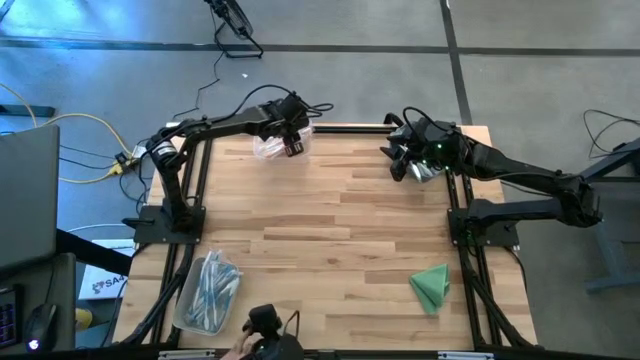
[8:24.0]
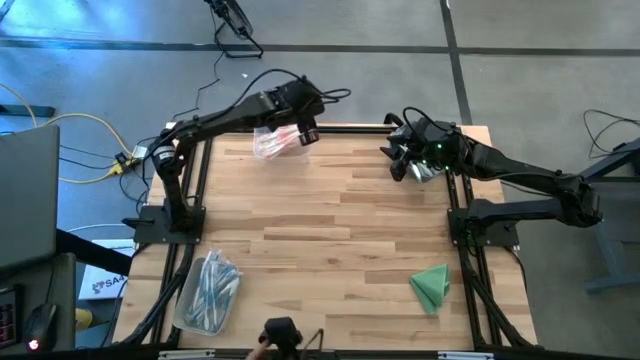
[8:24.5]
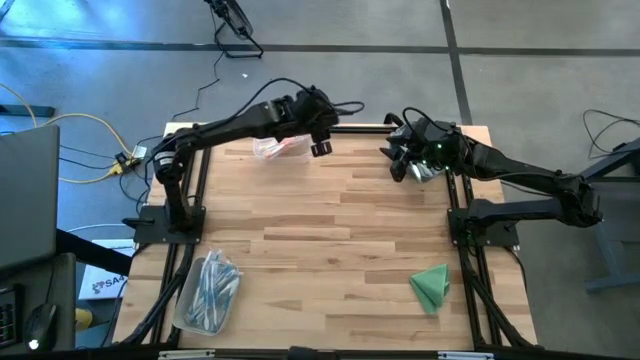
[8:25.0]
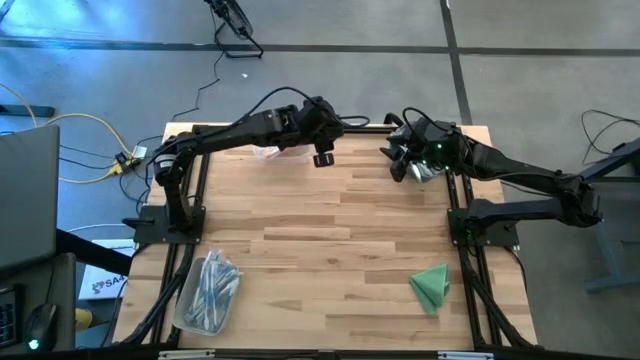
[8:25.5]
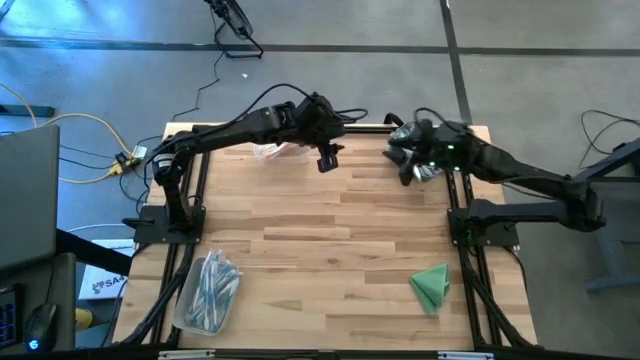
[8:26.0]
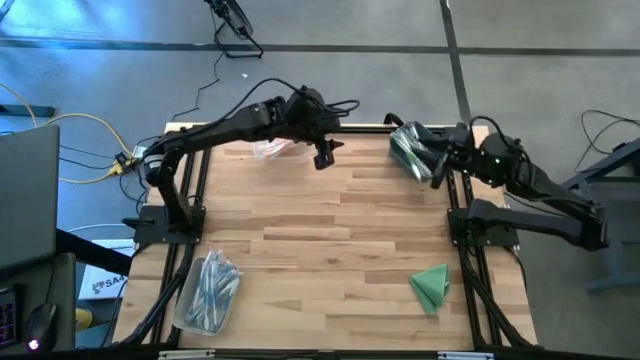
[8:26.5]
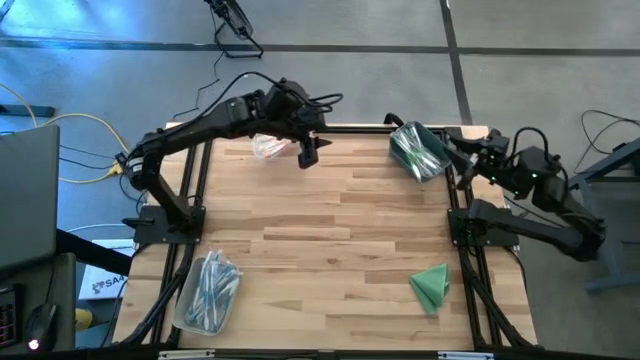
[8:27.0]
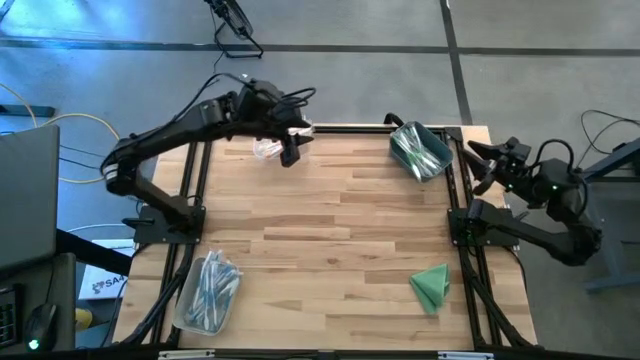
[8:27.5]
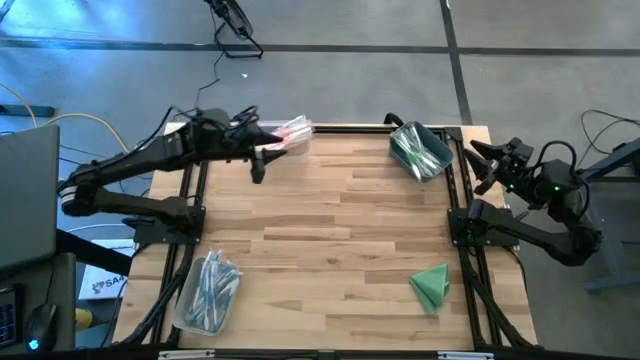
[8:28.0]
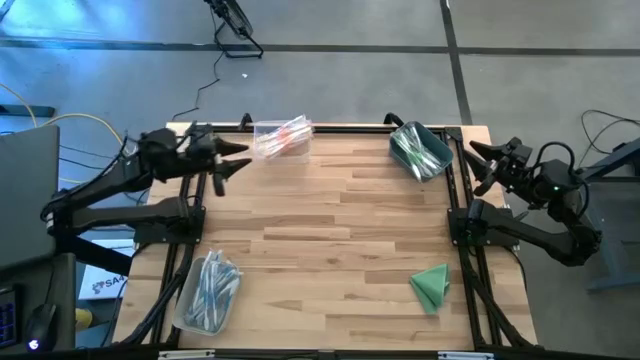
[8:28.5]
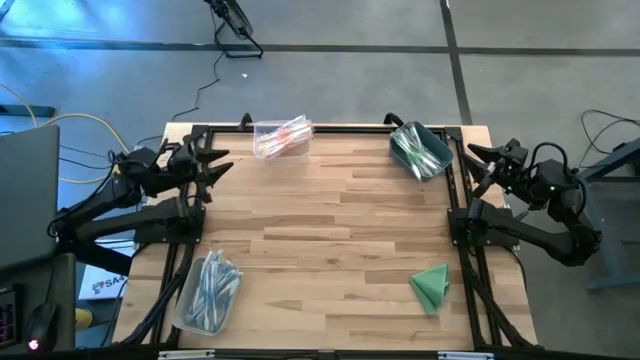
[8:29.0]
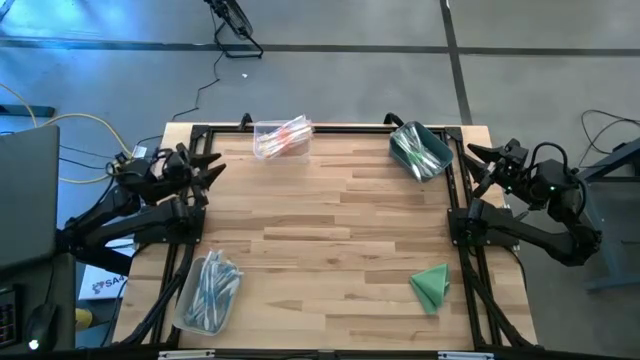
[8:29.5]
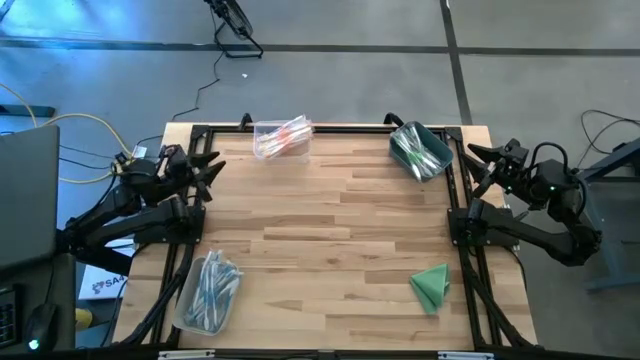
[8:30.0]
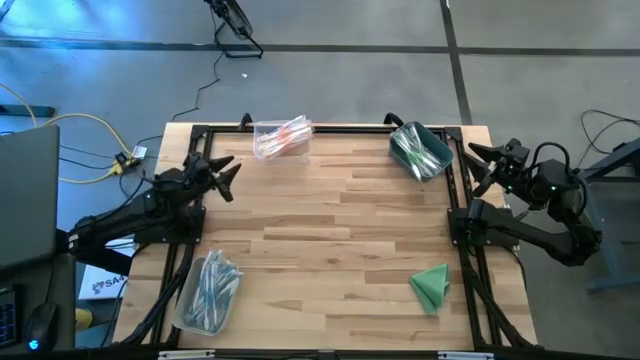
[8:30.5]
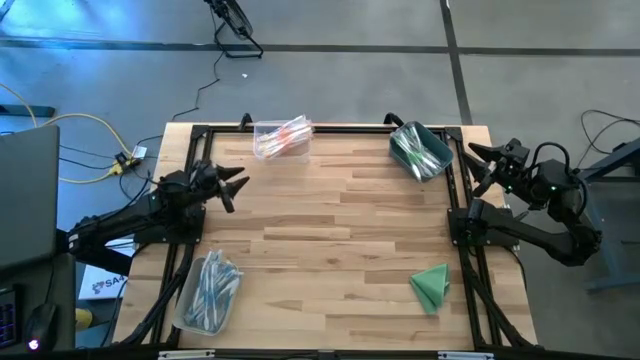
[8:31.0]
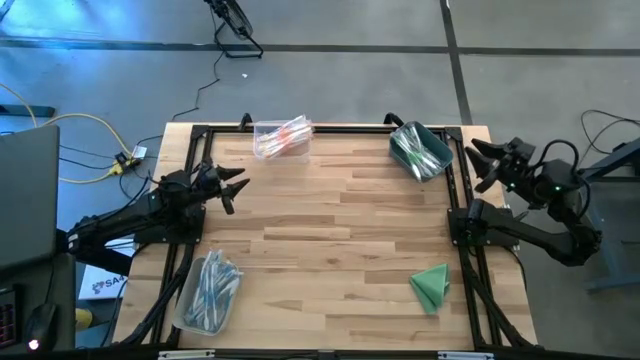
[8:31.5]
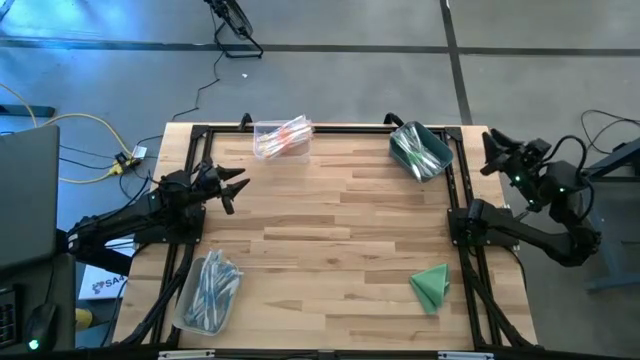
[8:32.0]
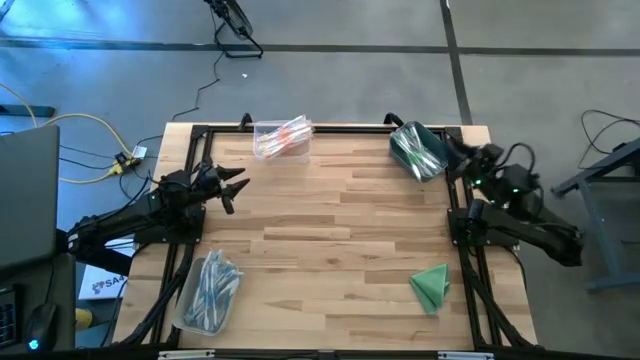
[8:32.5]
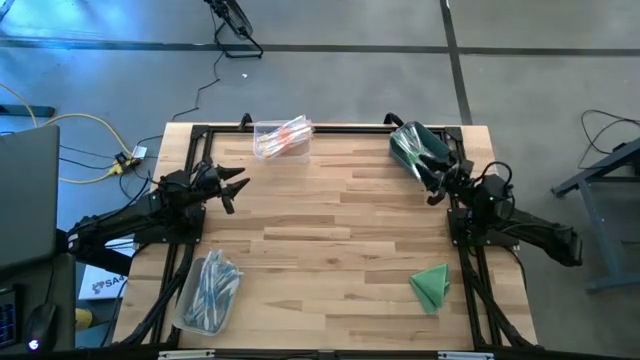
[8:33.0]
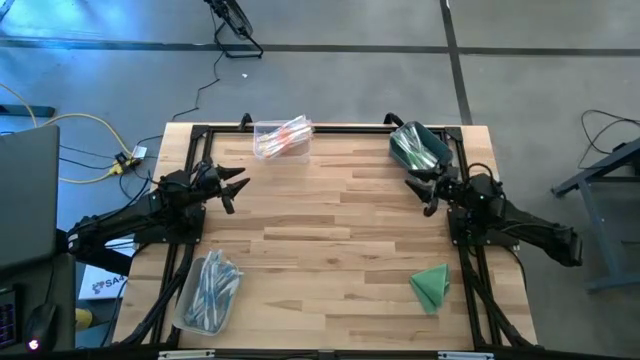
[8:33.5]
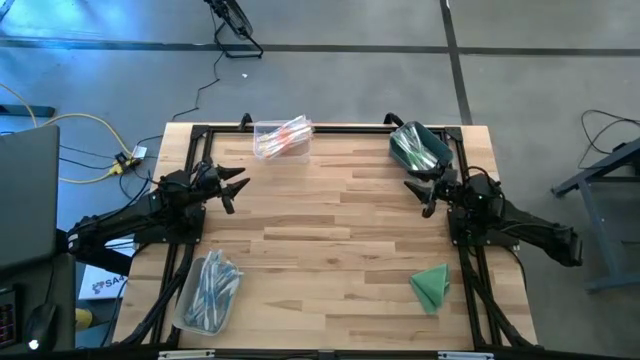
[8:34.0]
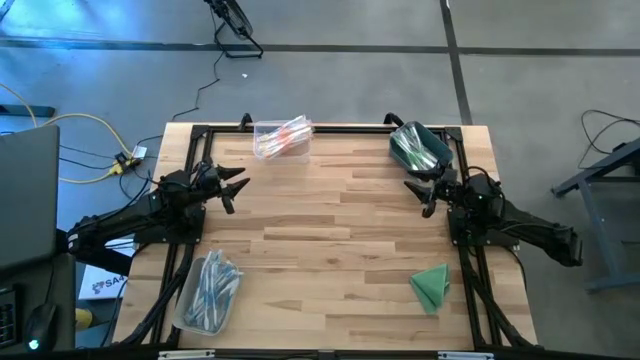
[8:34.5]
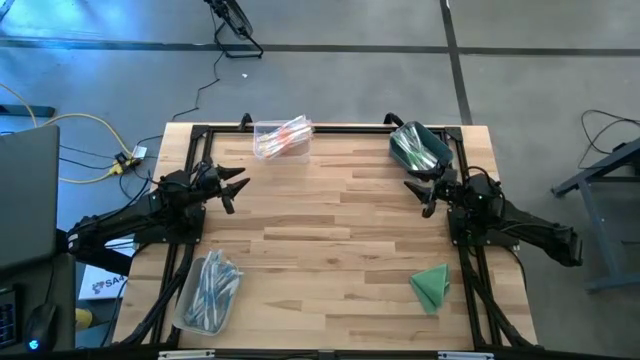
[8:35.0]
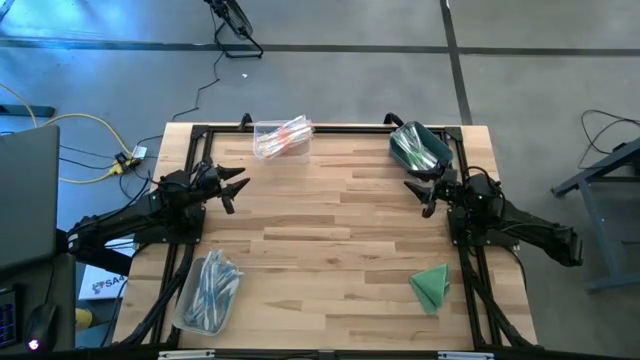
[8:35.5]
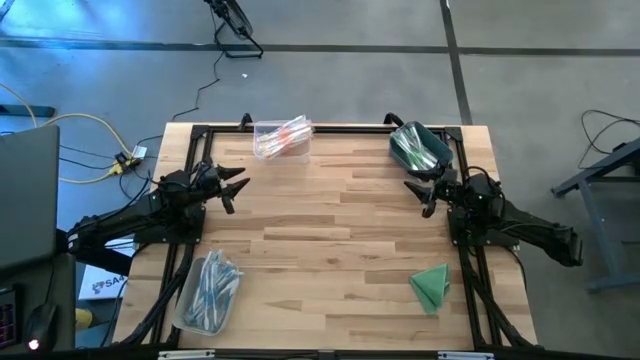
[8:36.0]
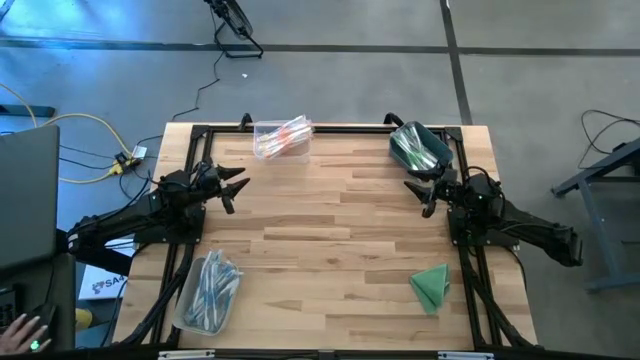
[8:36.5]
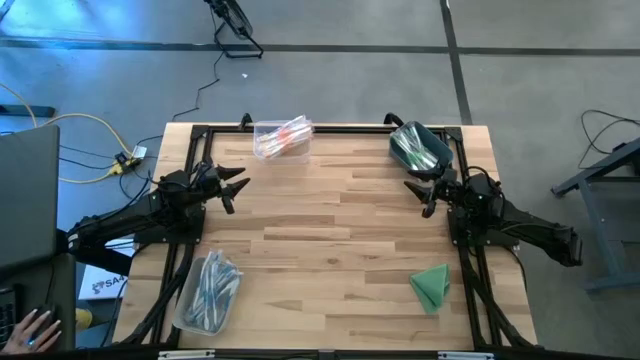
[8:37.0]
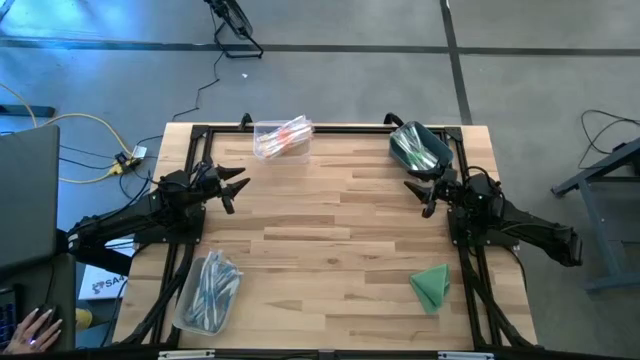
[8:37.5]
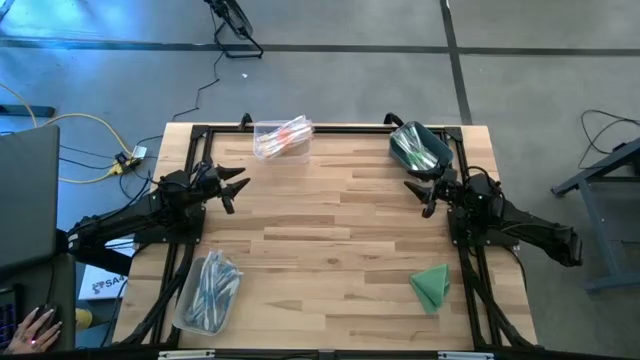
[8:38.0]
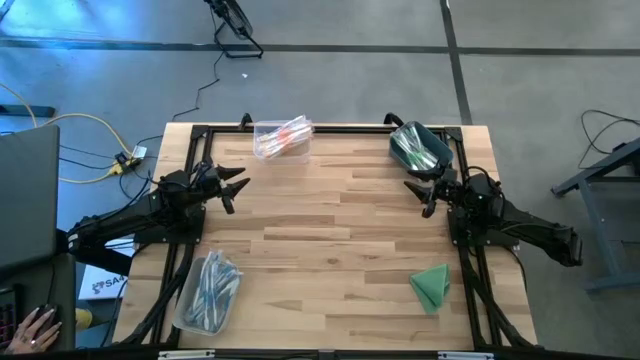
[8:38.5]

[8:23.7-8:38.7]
Task: Pick & Place Toothbrushes
Return to Home Position
